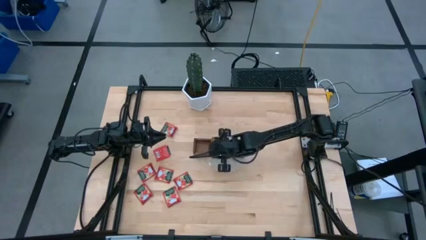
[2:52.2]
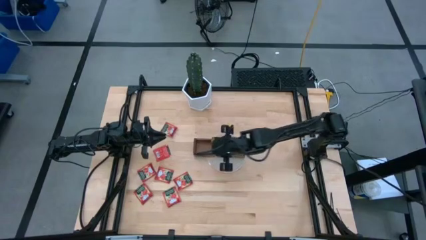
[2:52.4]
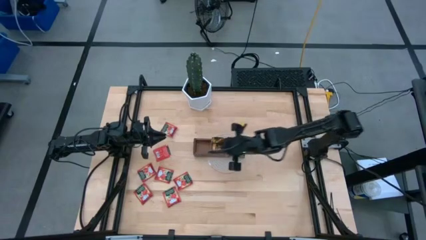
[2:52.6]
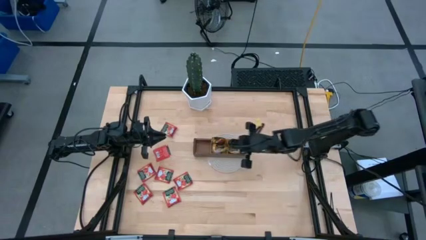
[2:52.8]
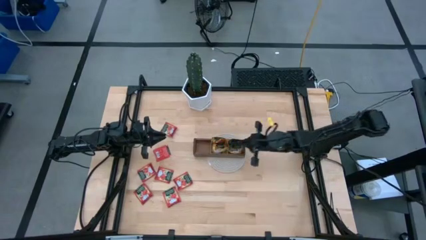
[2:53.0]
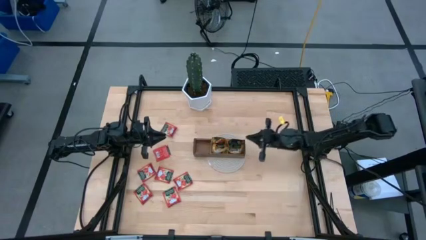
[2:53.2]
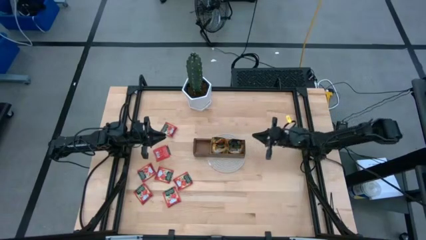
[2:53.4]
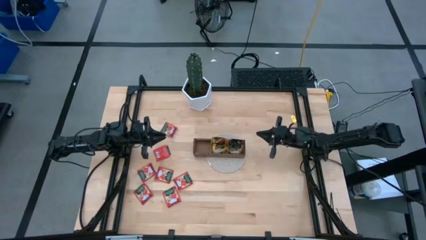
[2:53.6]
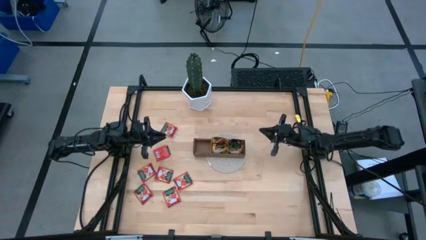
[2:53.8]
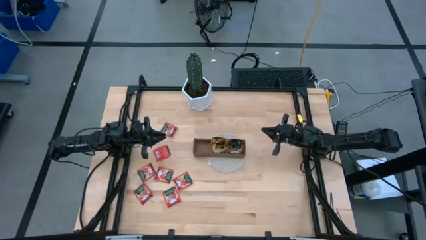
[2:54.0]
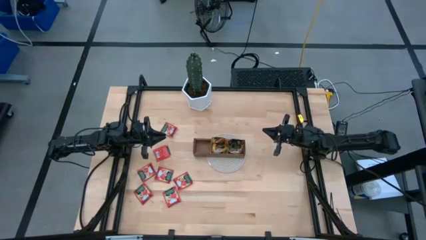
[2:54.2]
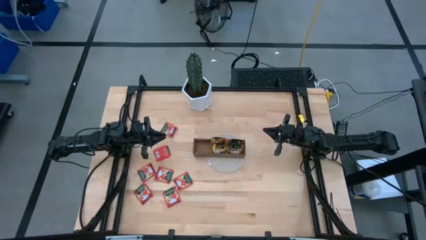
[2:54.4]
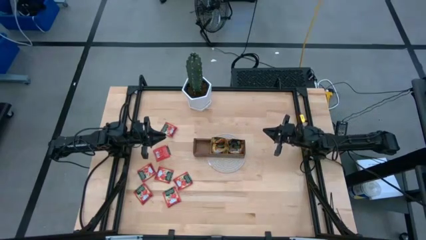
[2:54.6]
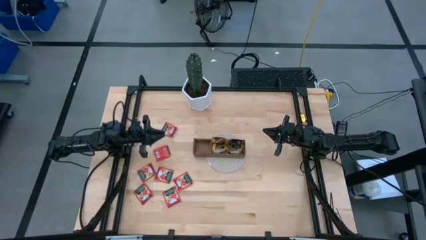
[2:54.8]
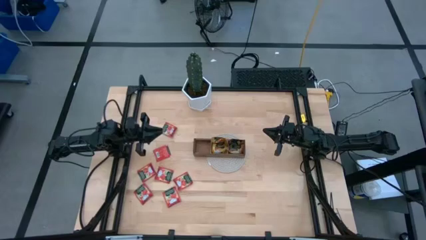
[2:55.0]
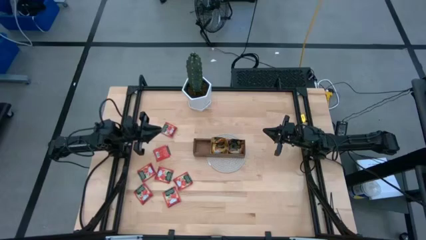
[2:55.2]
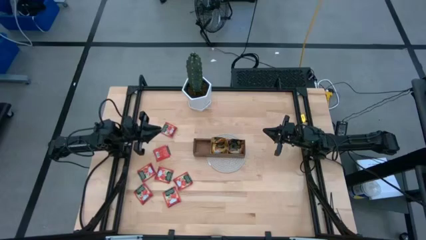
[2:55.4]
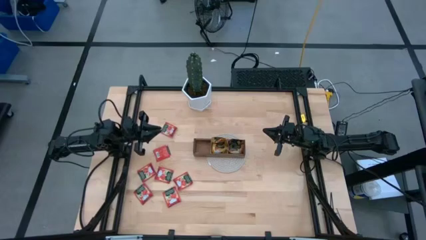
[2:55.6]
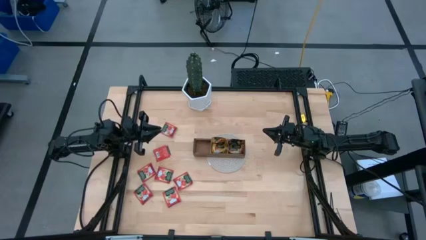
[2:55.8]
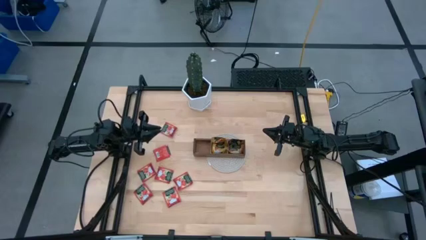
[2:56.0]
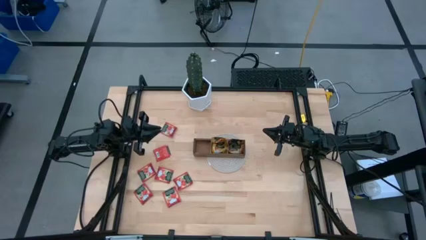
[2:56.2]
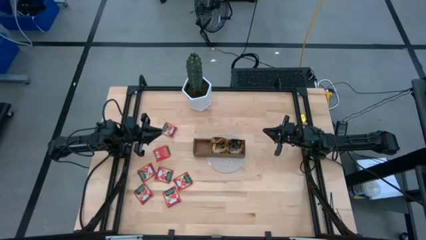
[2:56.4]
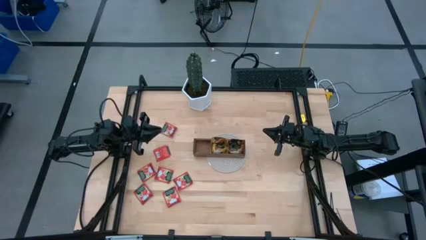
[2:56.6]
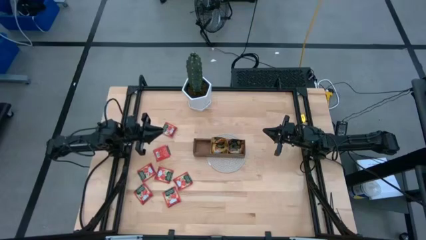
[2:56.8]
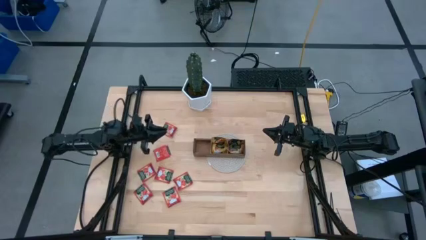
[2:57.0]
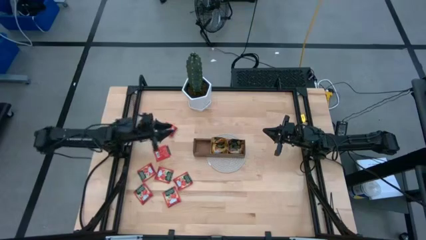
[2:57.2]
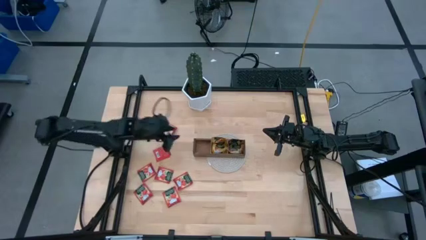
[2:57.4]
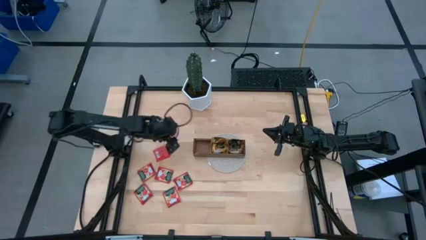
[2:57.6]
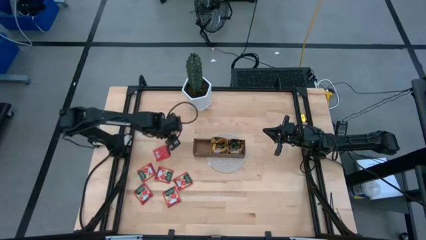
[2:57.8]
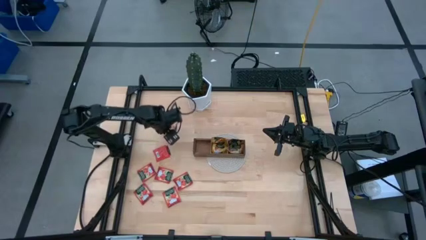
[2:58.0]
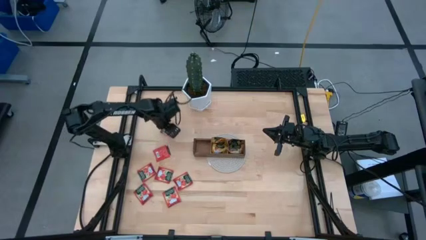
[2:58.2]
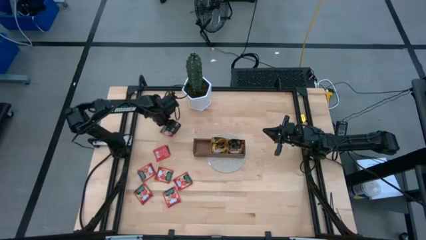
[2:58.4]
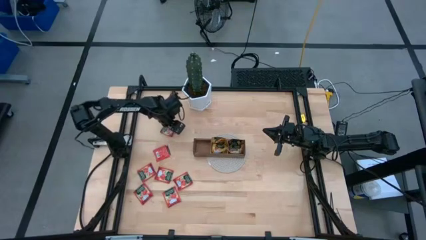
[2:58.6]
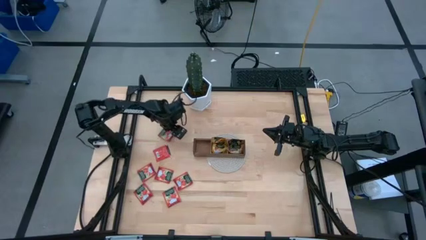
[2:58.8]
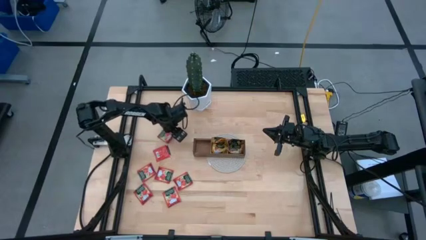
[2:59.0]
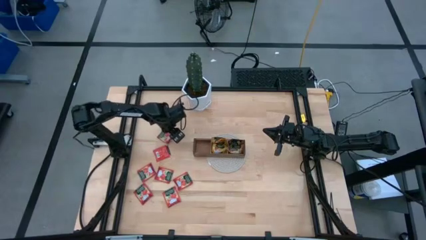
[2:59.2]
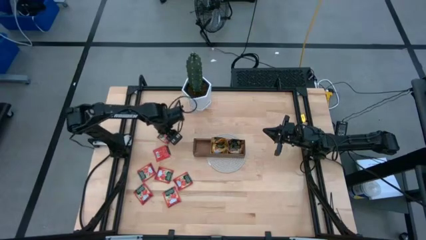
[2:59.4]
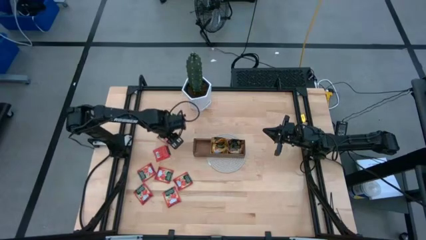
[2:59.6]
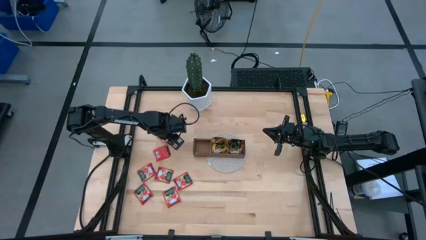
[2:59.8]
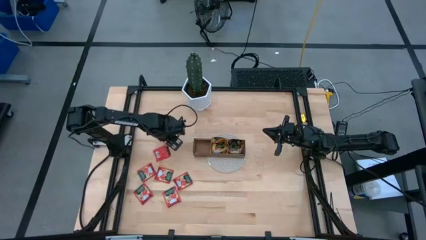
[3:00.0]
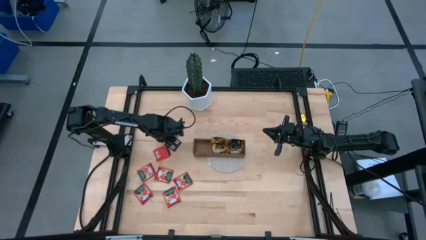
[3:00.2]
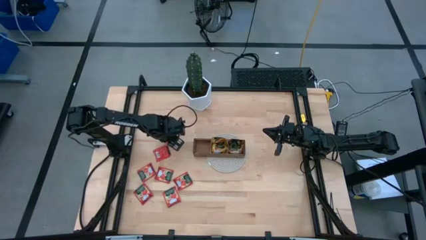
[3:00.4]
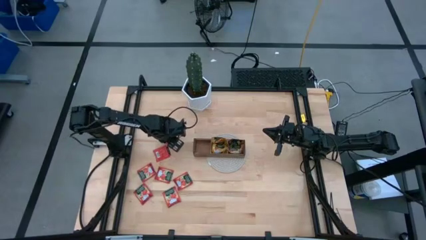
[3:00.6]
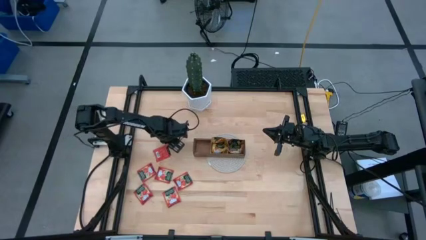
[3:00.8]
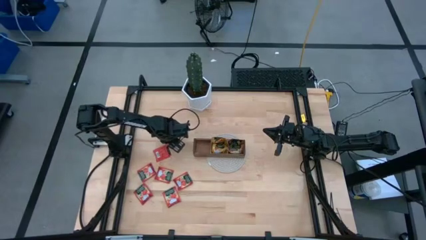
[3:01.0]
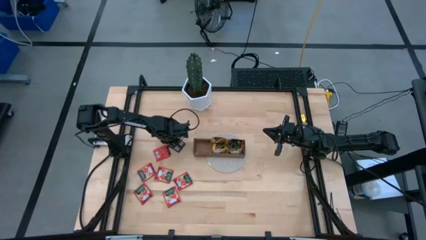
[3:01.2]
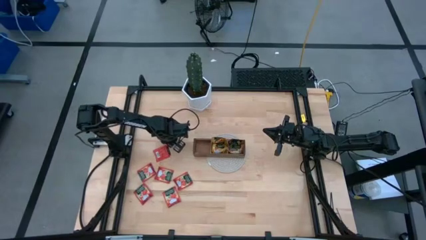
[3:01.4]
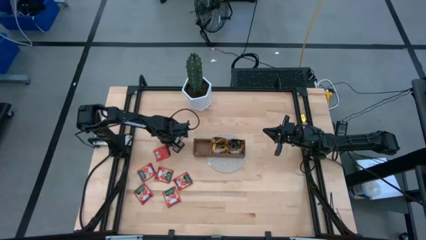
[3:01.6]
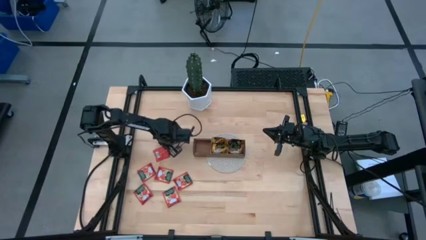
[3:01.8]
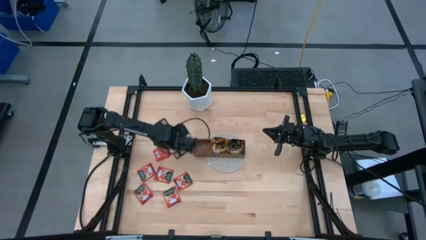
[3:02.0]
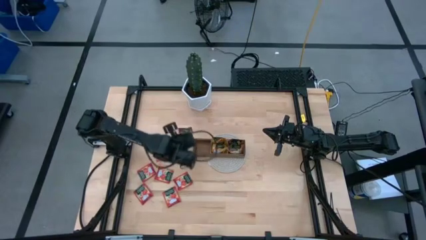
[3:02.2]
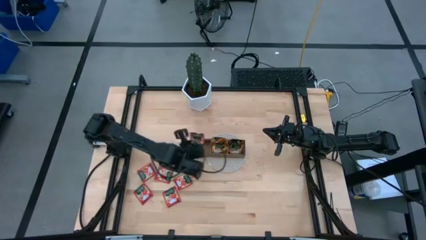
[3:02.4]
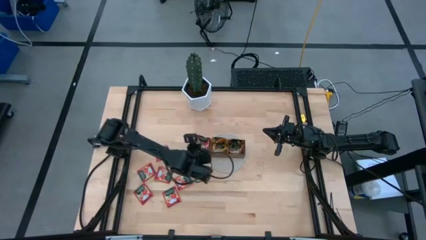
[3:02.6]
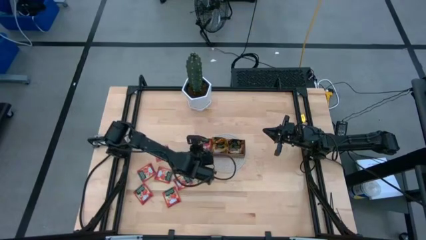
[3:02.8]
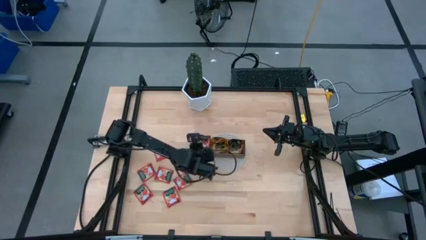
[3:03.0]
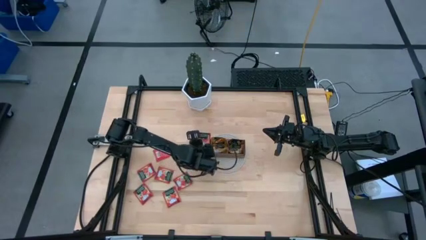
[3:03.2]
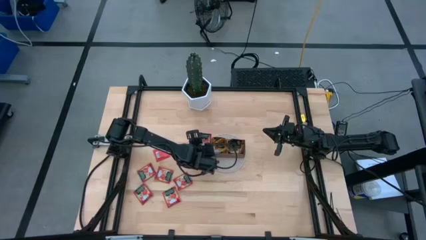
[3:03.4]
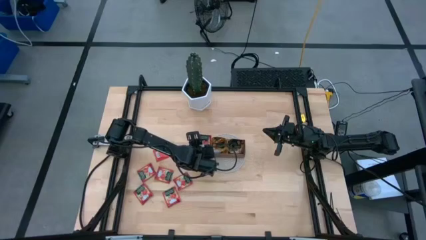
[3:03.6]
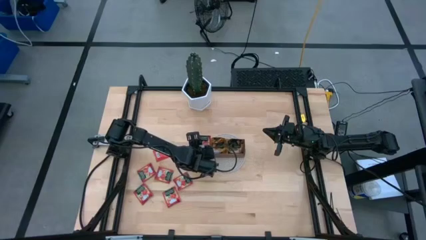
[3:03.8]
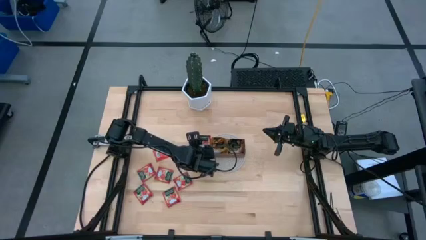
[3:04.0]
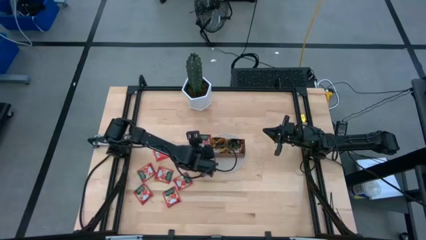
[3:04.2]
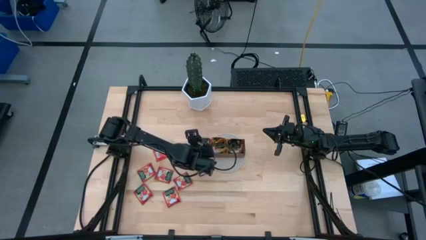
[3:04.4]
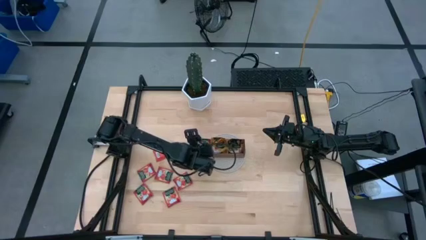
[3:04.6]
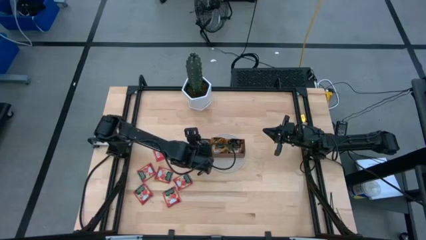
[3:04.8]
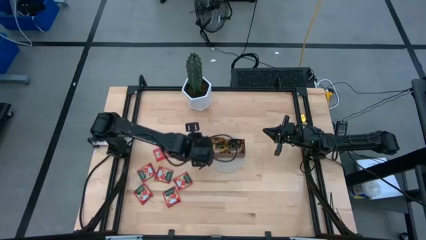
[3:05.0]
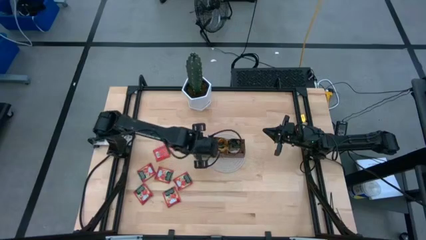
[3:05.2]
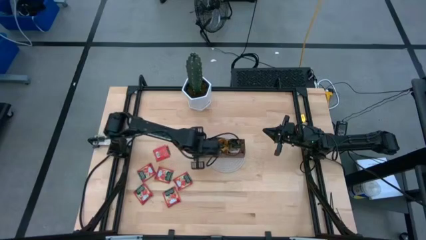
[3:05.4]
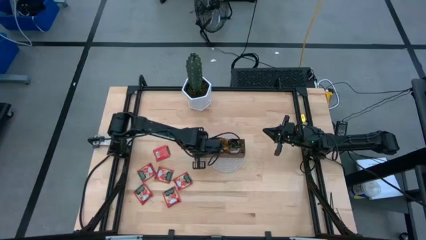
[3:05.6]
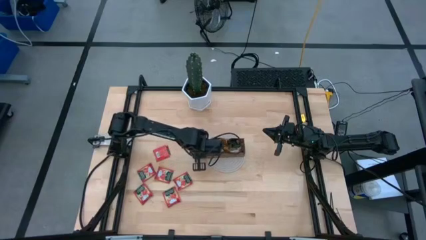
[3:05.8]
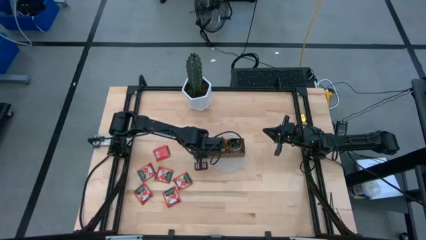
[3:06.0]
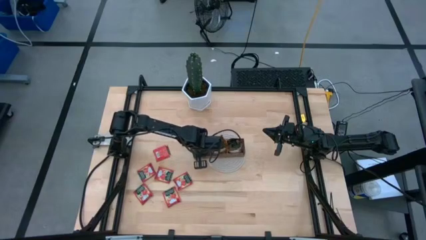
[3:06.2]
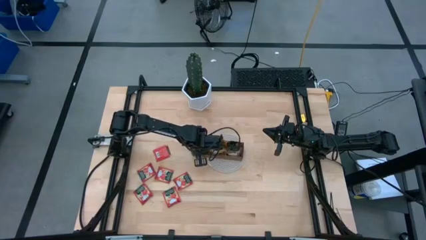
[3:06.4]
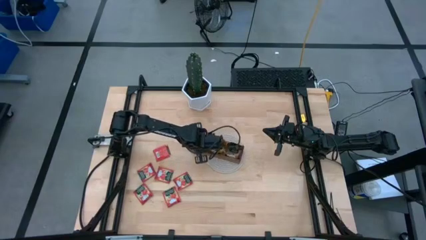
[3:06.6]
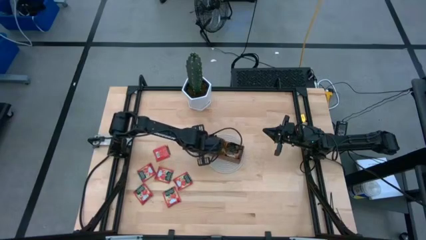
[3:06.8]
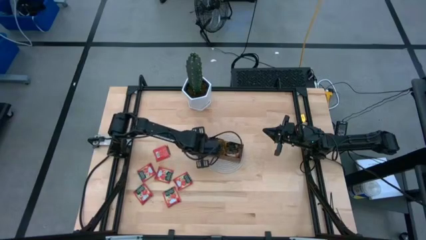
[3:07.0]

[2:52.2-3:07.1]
Task: Pick & Place Tea
Put the red tea bag into the left section of the wooden organizer

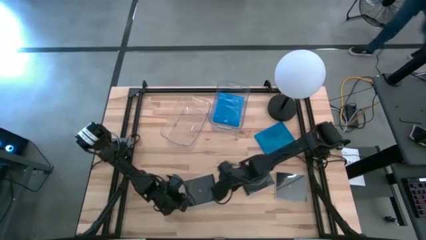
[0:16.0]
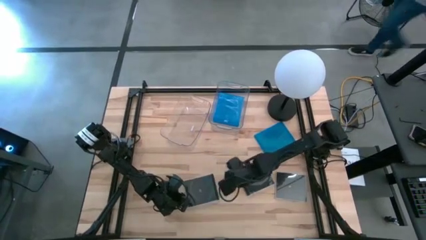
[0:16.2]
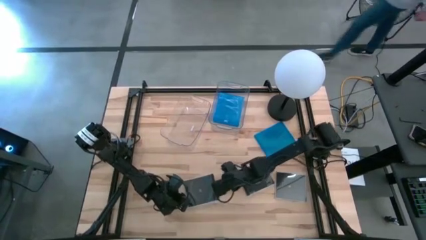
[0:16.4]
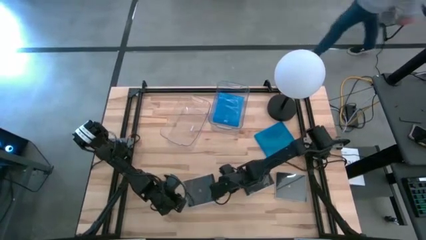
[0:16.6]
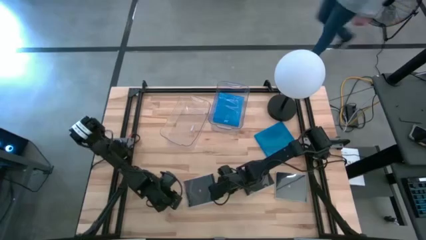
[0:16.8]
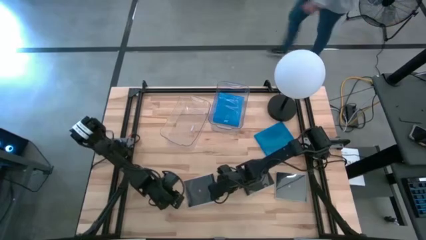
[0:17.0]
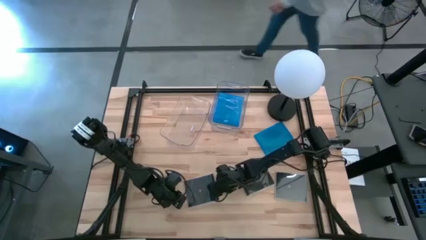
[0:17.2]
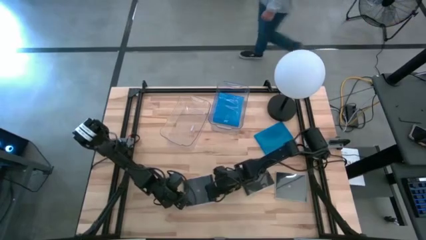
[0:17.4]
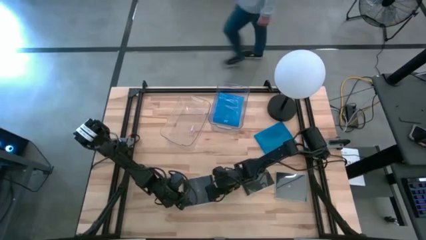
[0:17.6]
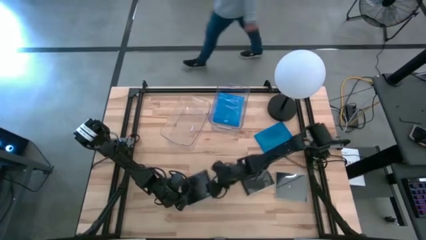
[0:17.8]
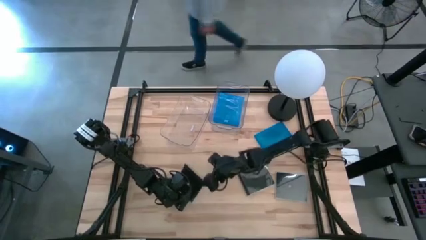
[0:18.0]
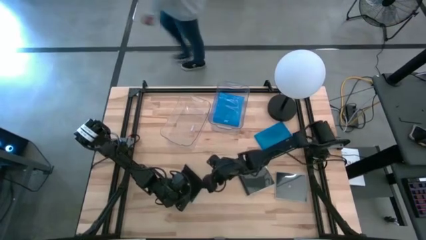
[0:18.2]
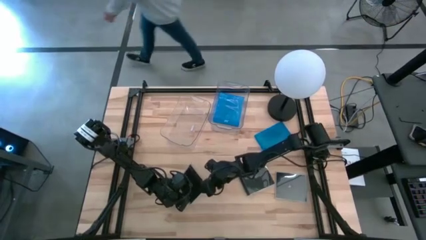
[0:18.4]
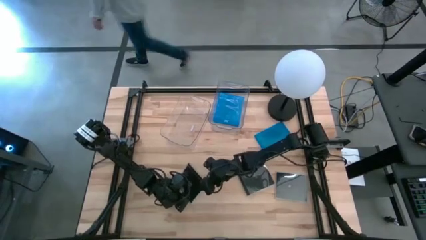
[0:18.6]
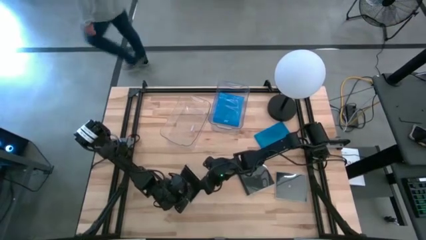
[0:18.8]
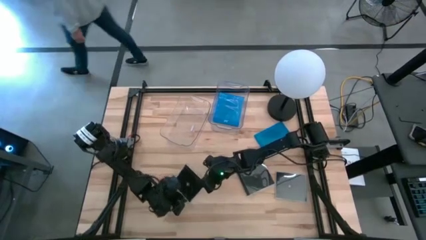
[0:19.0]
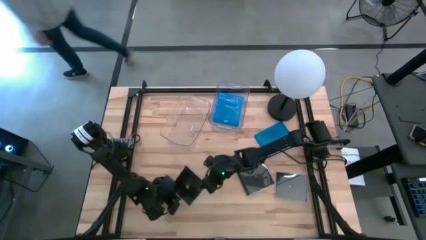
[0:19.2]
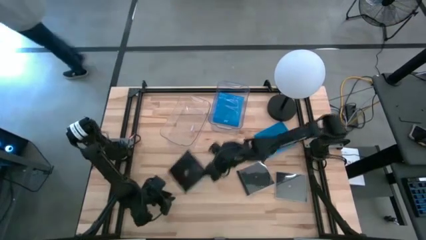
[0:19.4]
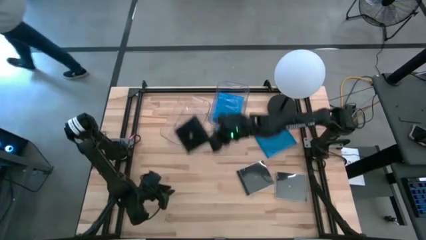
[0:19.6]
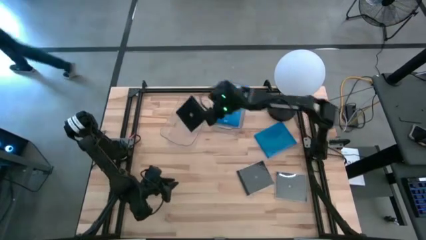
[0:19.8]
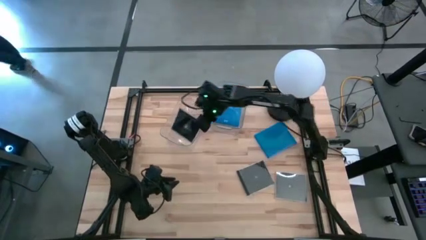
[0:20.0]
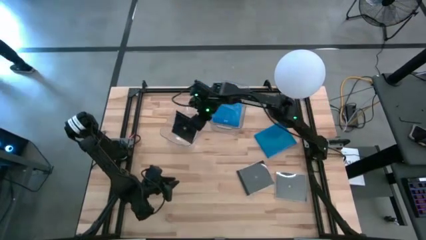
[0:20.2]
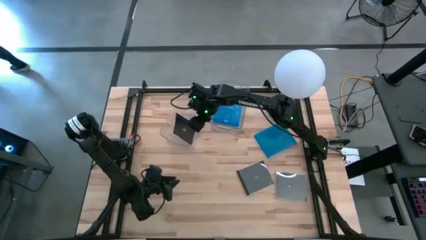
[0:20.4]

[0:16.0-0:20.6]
Task: Pick & place jewel cases by type
Put the left black cd case into the left transparent bin
